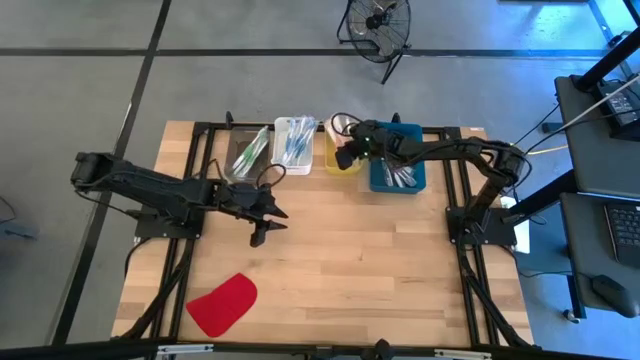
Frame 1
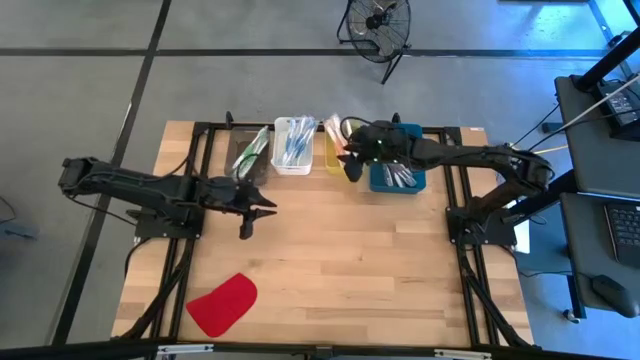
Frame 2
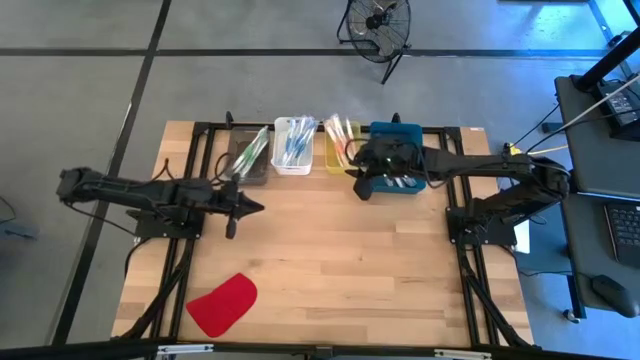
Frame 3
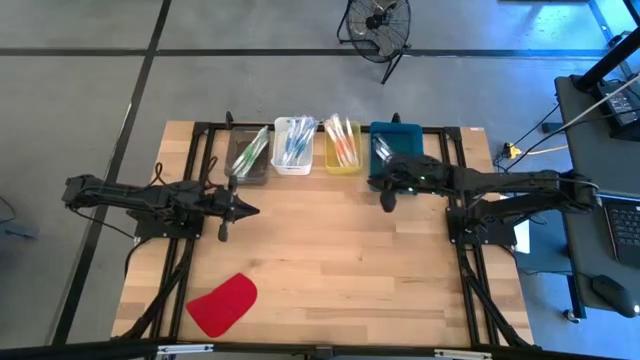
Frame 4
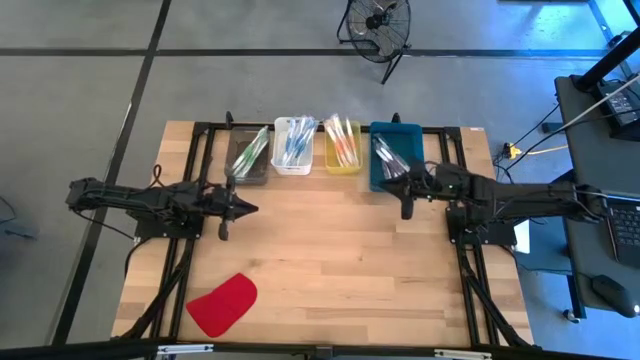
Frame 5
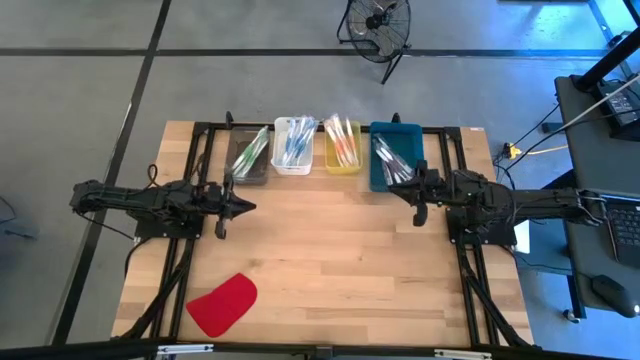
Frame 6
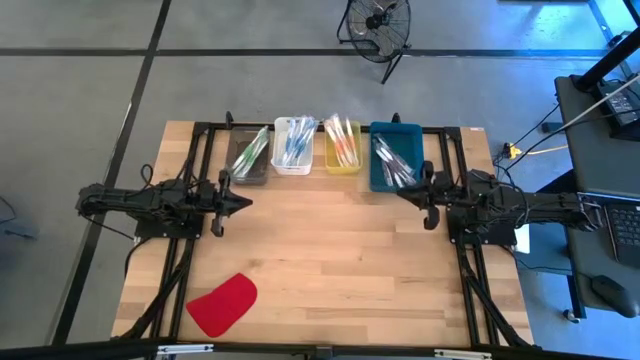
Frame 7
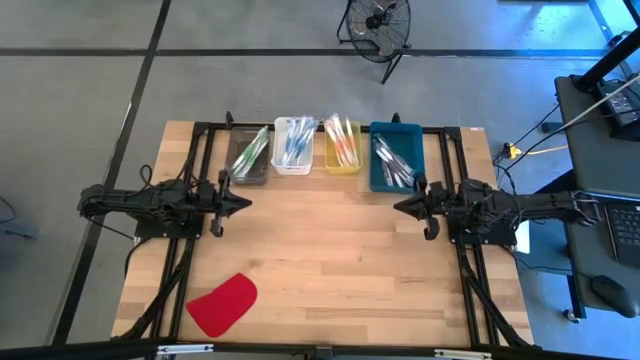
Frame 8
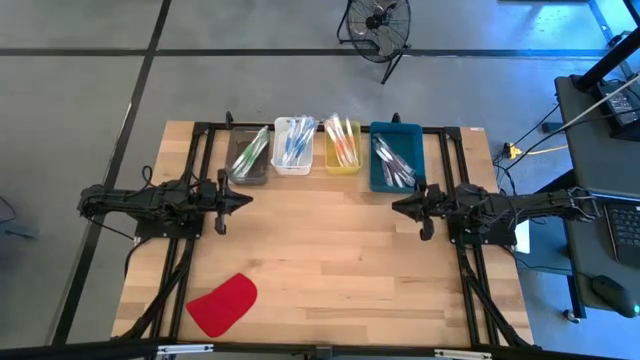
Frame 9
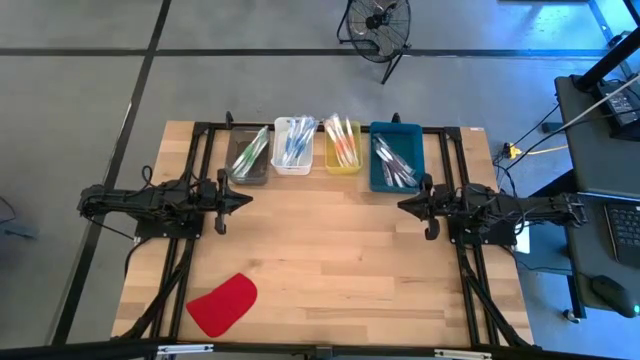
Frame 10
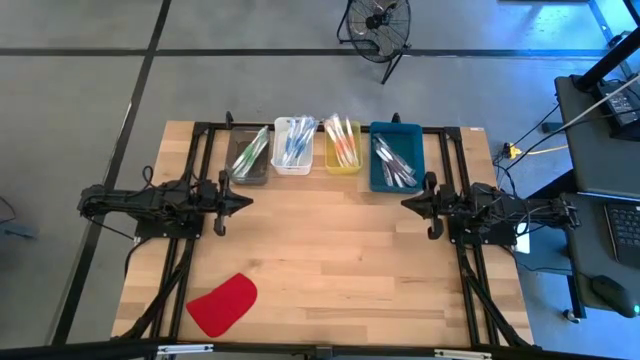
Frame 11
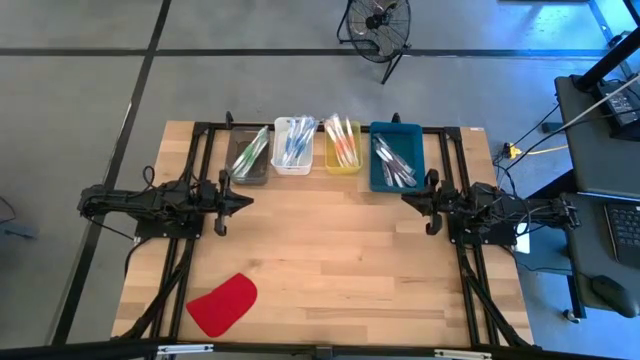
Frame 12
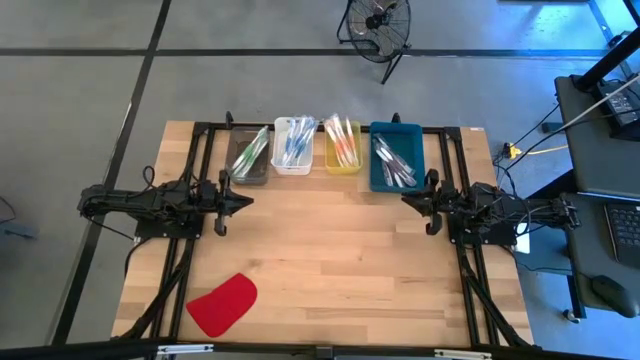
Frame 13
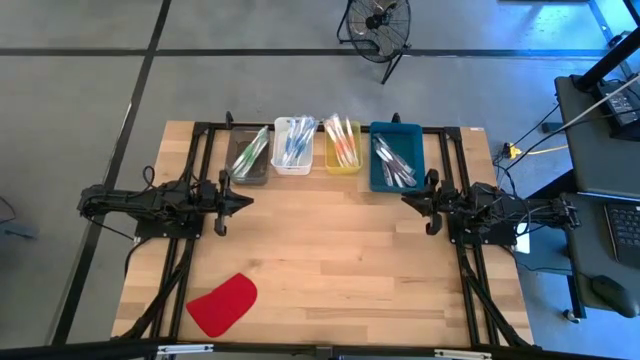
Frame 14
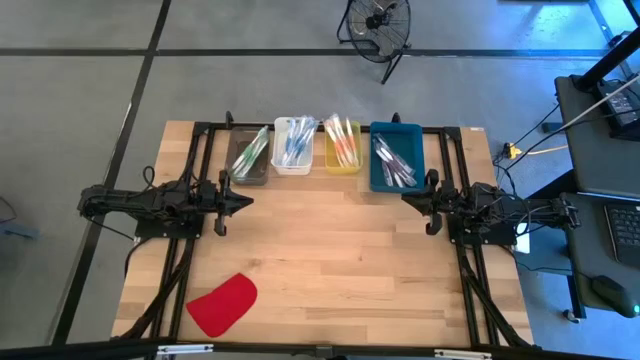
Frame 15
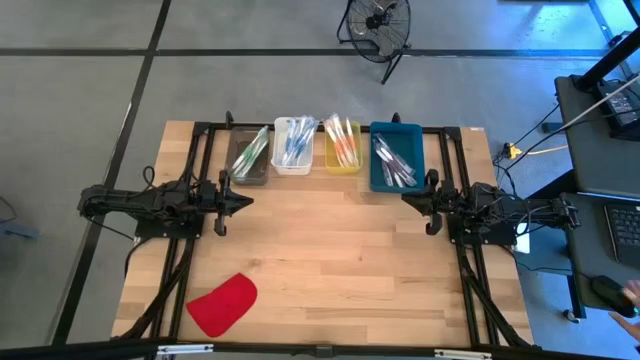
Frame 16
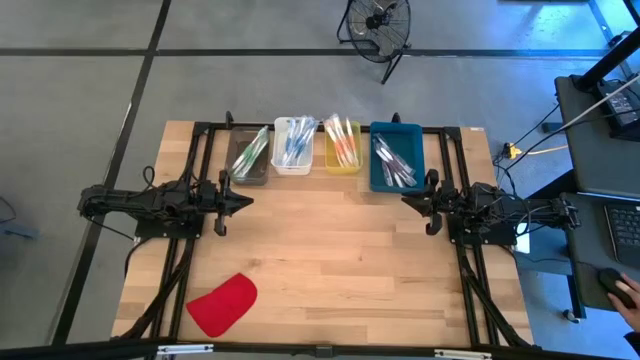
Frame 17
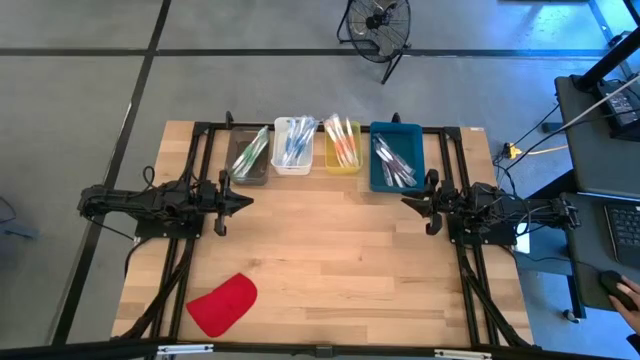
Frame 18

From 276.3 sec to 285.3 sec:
Task: Pick & Place Toothbrushes
Return to Home Position

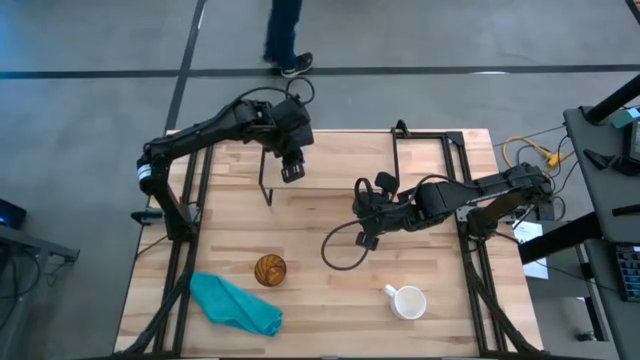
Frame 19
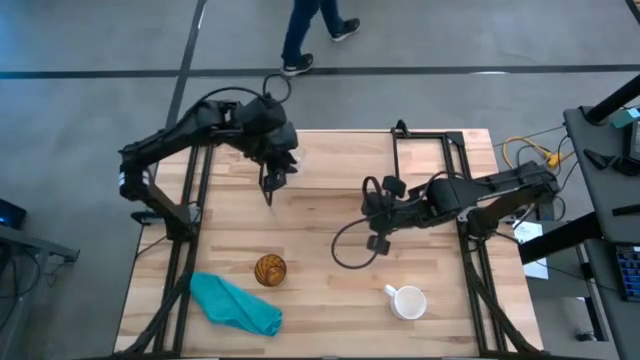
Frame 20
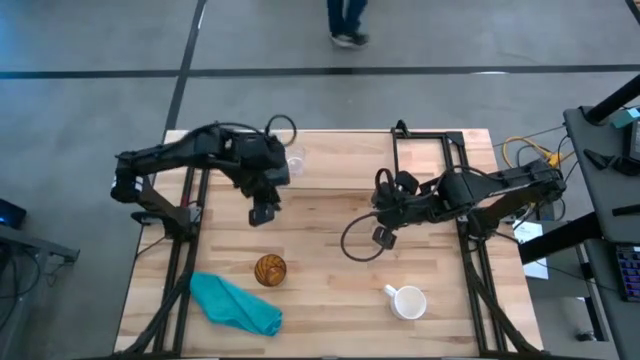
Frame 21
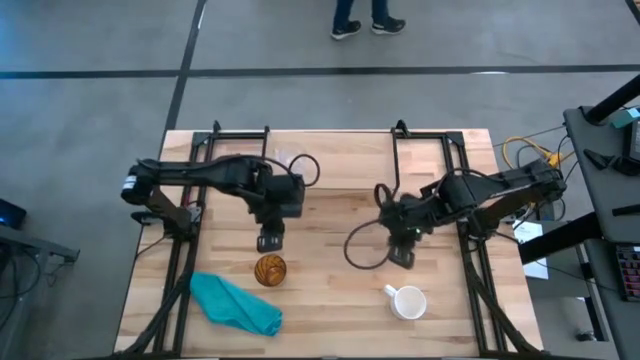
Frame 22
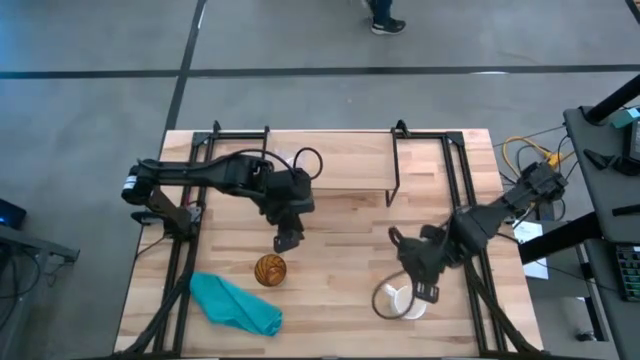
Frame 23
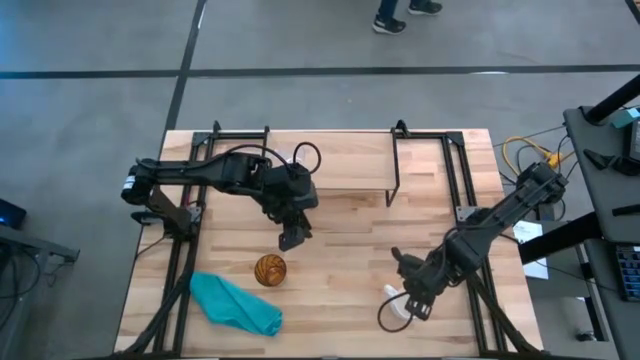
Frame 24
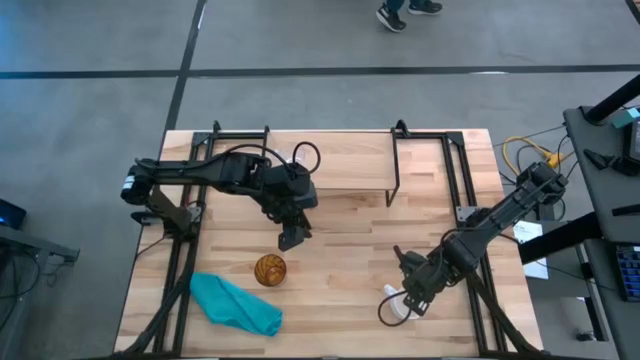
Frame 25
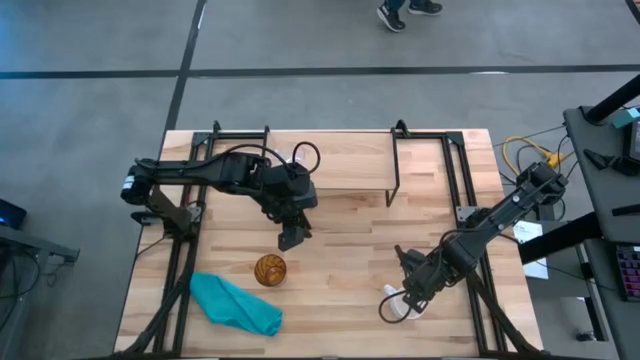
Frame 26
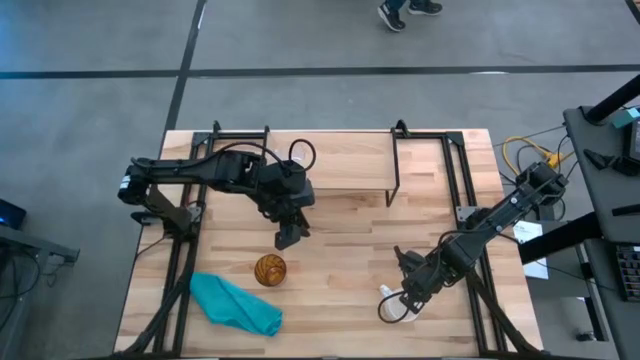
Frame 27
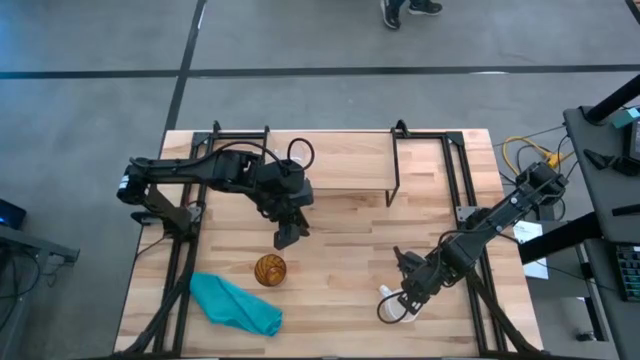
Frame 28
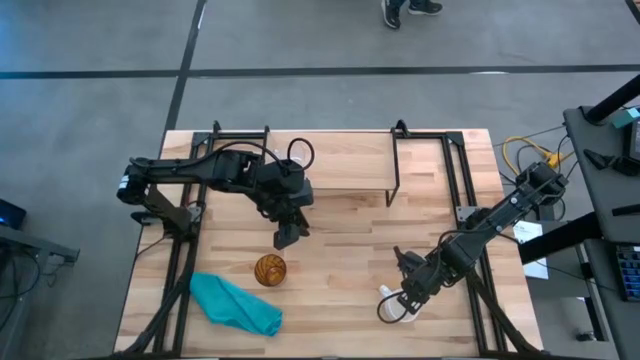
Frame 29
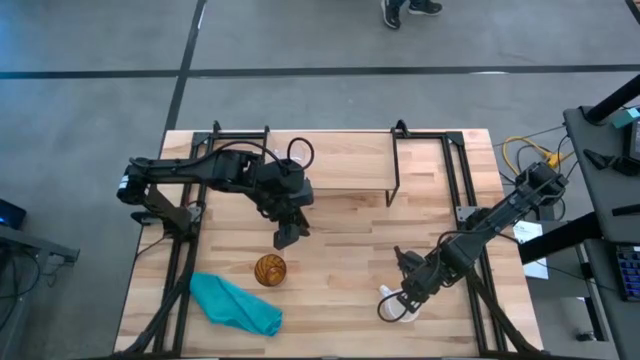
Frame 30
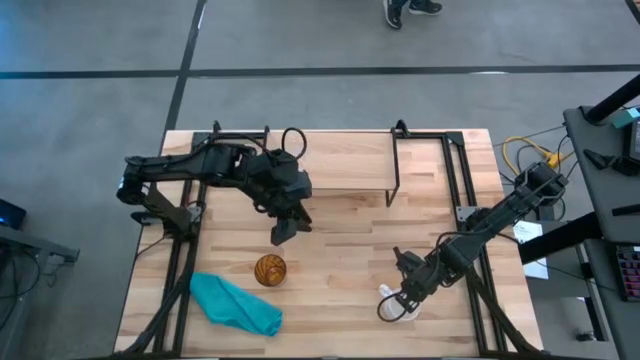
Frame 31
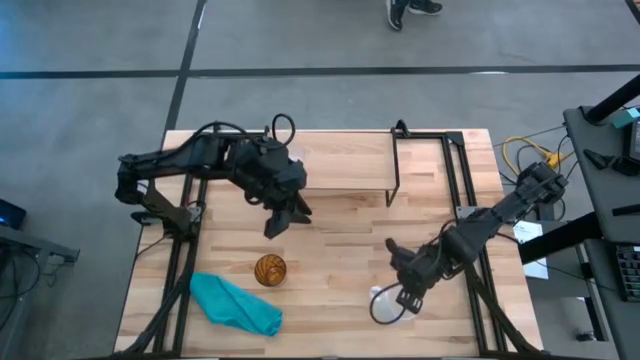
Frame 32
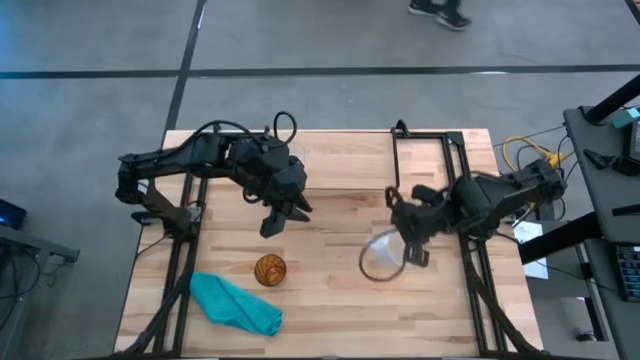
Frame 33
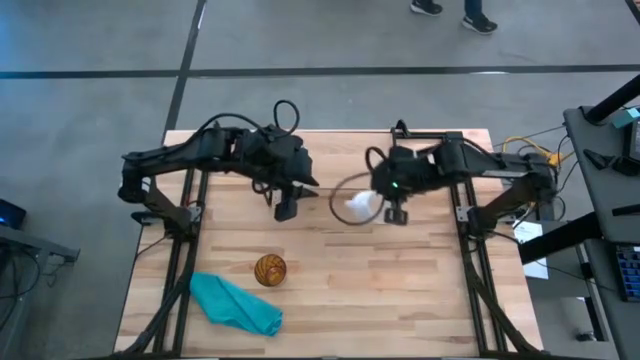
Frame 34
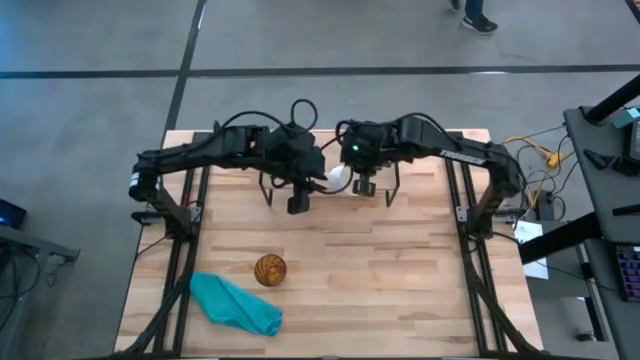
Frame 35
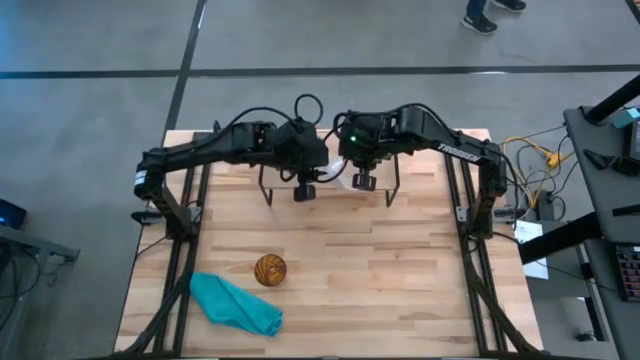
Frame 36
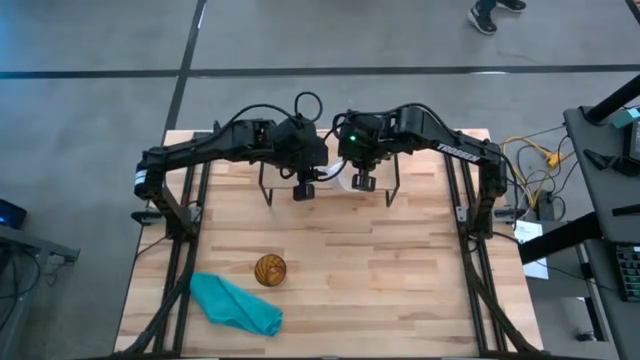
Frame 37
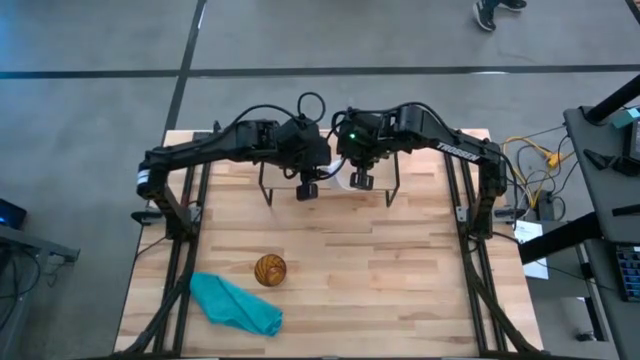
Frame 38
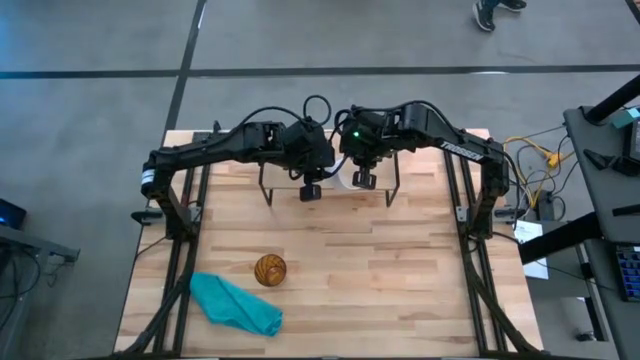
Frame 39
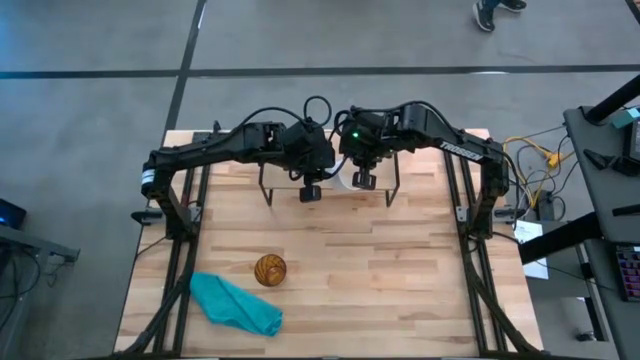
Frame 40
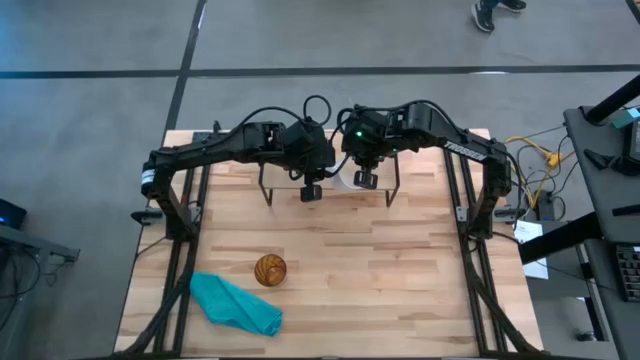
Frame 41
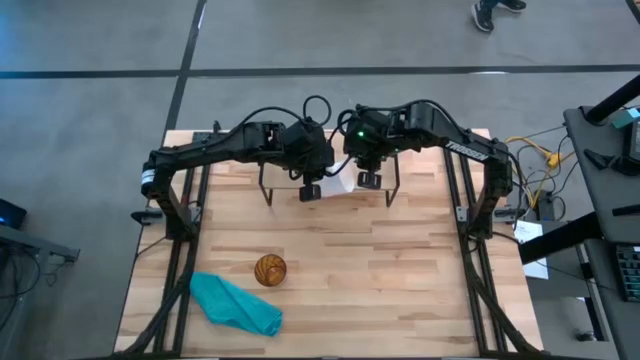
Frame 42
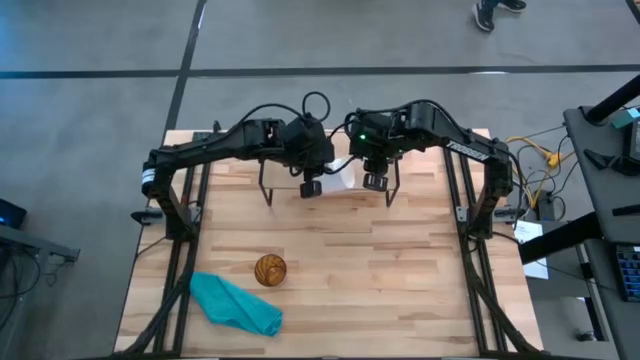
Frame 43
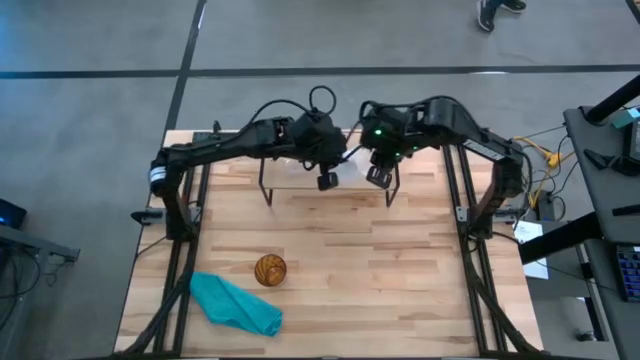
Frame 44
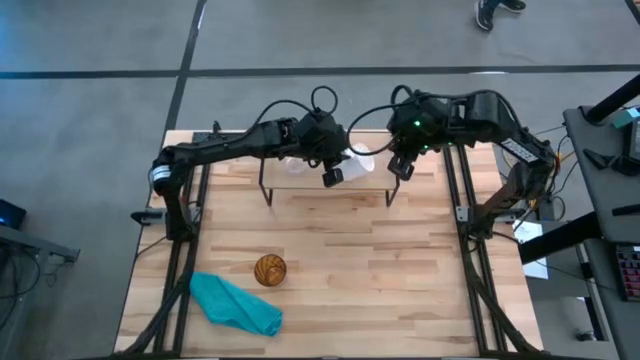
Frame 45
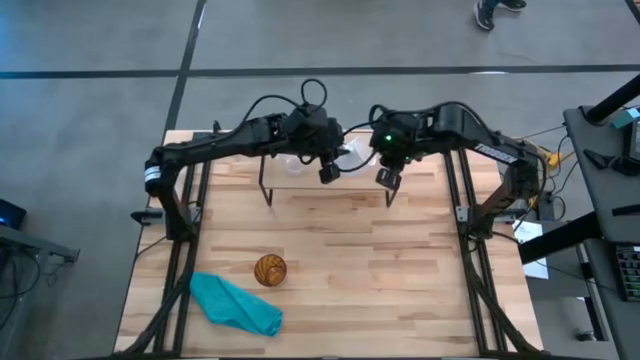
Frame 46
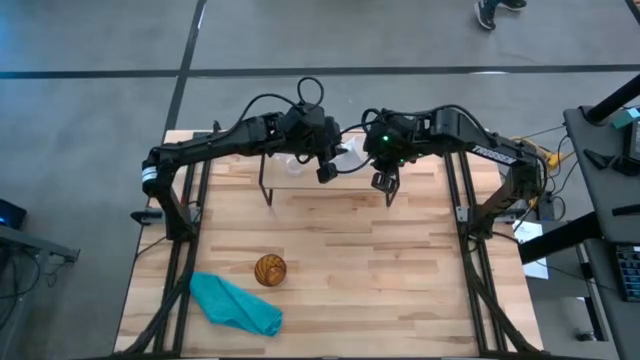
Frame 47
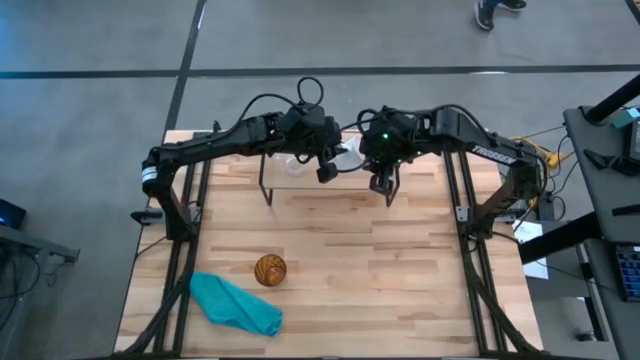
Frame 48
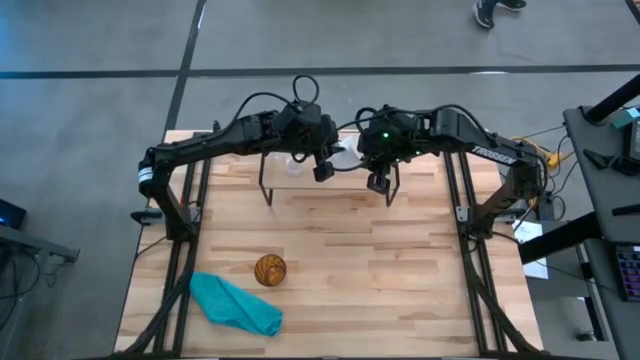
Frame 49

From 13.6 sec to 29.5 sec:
Task: Stack small to large cups/mugs on shelf
Put the white mug on the shelf
